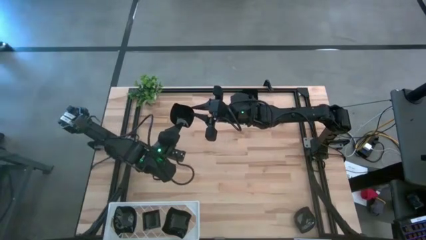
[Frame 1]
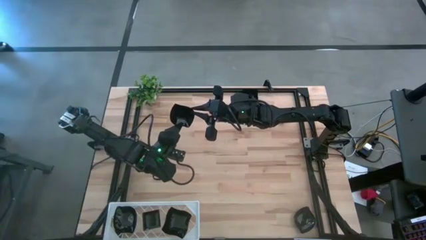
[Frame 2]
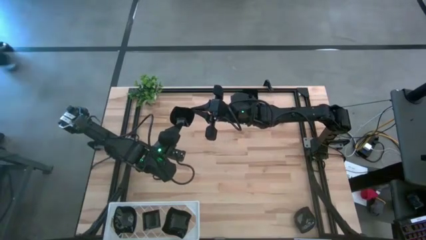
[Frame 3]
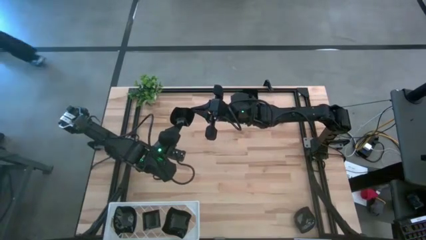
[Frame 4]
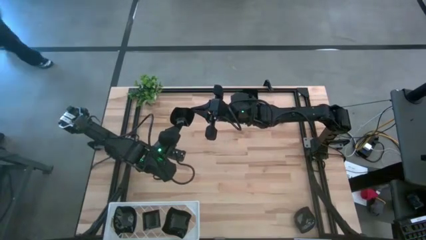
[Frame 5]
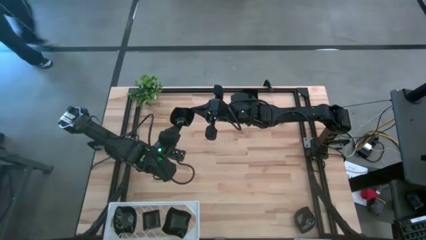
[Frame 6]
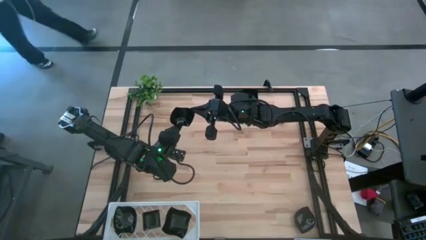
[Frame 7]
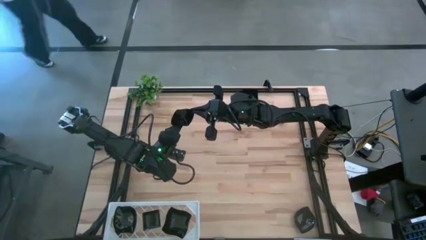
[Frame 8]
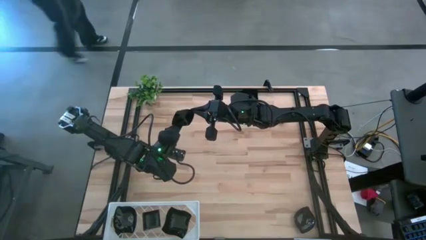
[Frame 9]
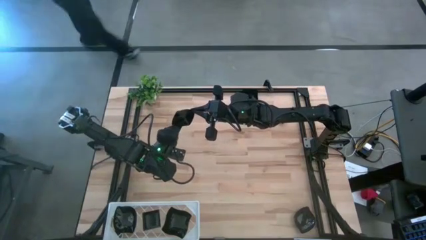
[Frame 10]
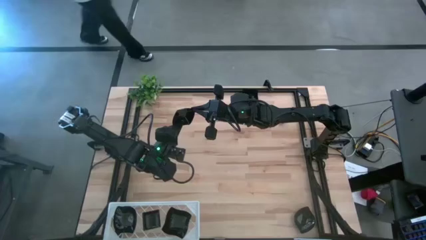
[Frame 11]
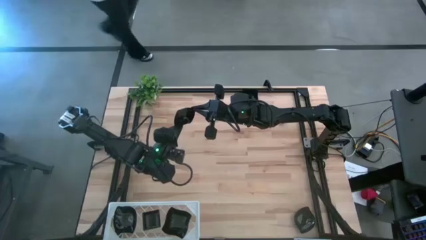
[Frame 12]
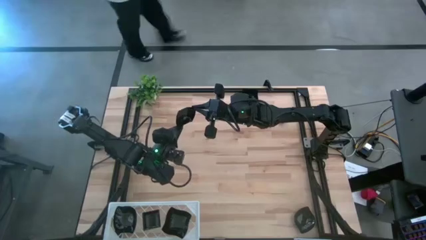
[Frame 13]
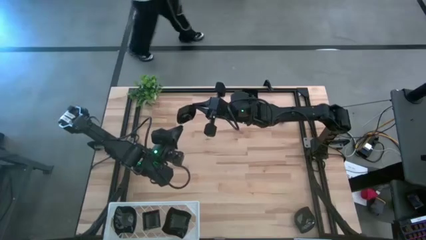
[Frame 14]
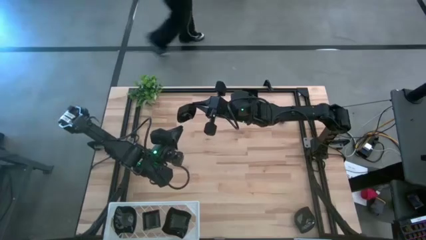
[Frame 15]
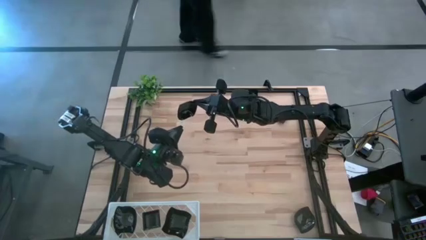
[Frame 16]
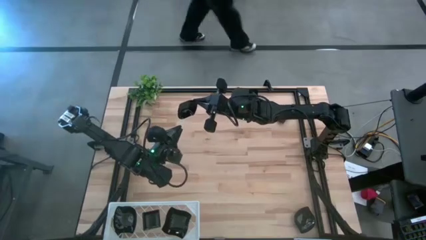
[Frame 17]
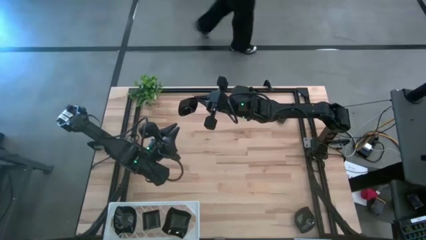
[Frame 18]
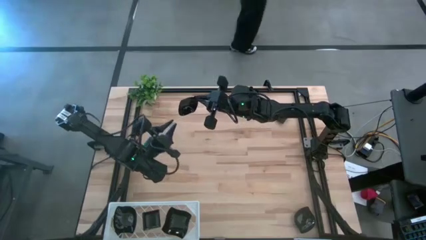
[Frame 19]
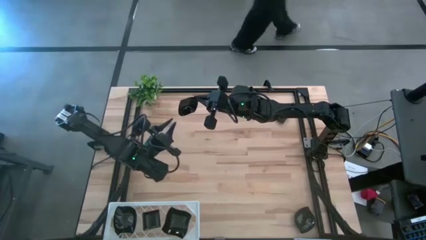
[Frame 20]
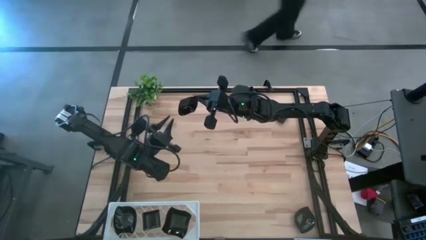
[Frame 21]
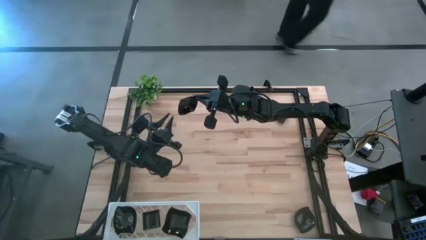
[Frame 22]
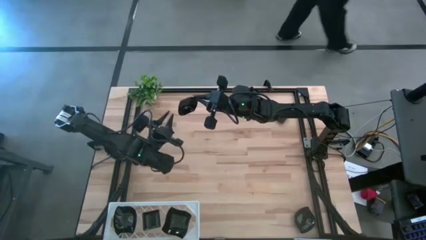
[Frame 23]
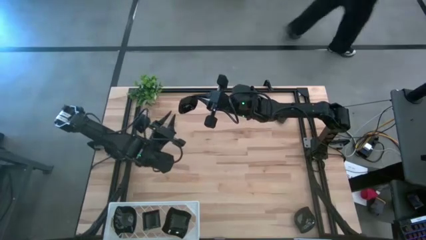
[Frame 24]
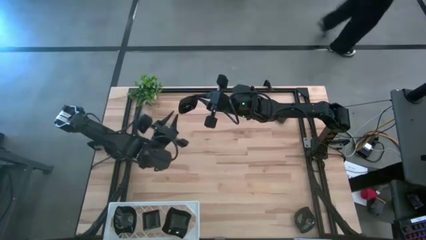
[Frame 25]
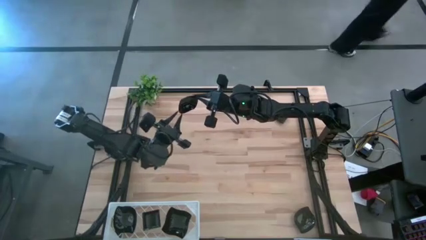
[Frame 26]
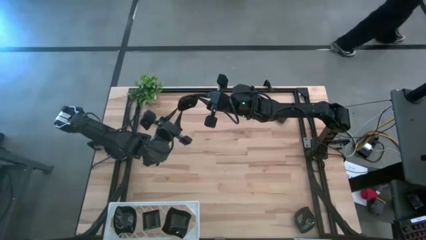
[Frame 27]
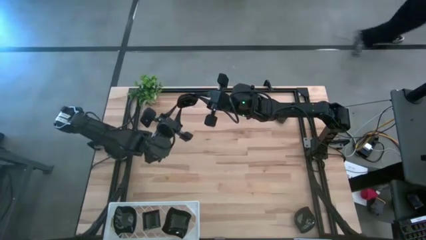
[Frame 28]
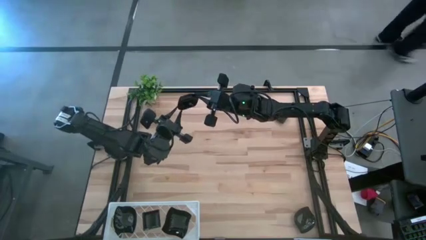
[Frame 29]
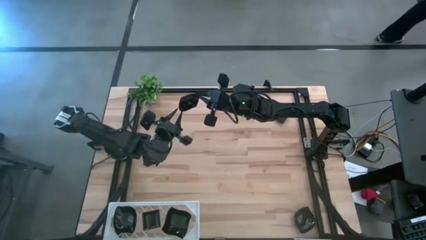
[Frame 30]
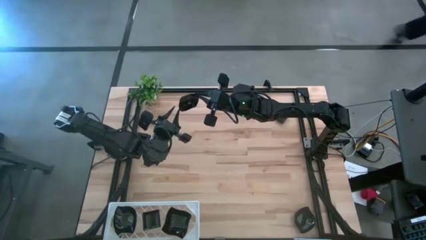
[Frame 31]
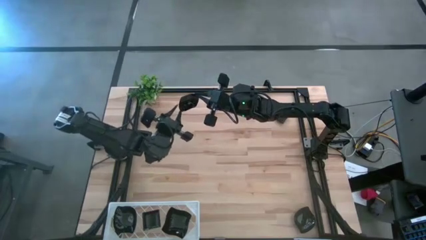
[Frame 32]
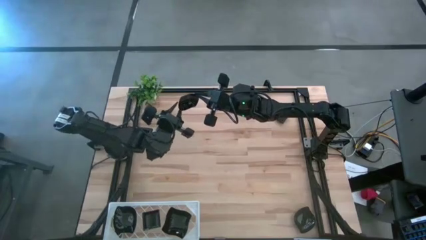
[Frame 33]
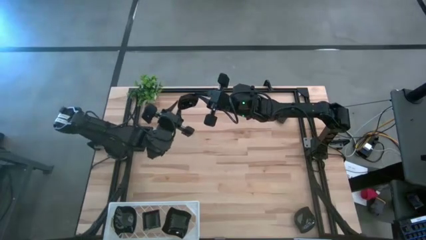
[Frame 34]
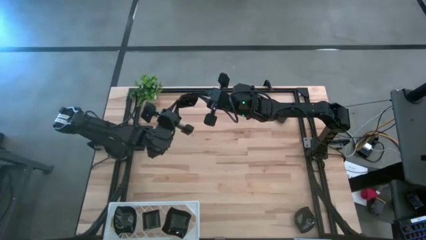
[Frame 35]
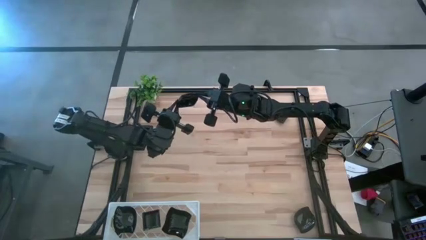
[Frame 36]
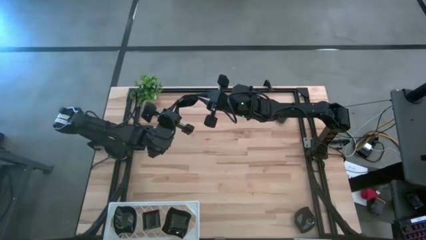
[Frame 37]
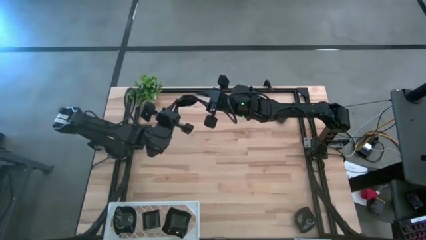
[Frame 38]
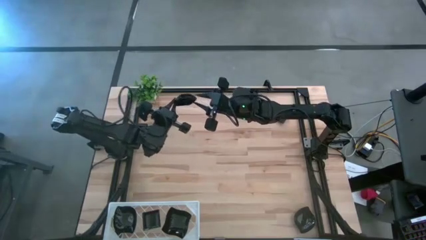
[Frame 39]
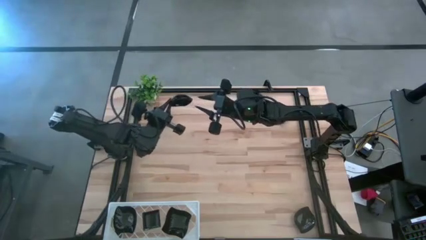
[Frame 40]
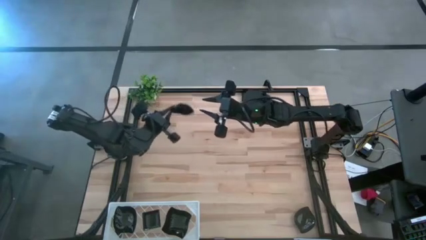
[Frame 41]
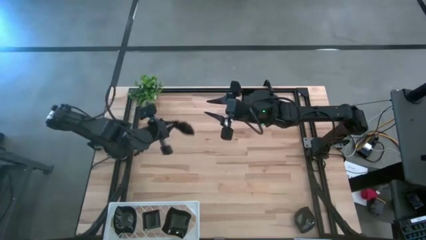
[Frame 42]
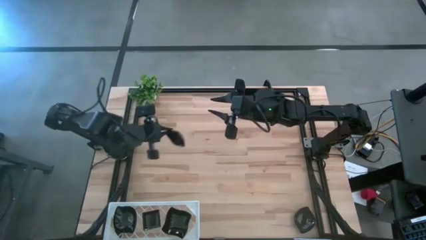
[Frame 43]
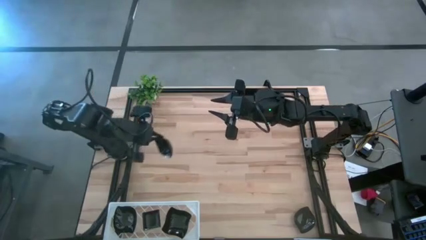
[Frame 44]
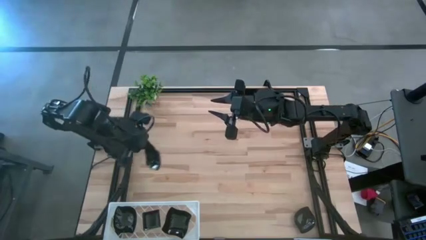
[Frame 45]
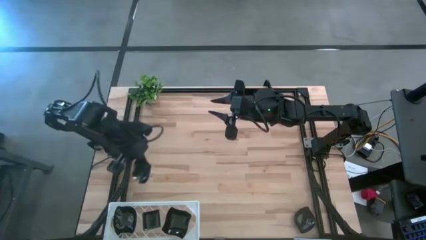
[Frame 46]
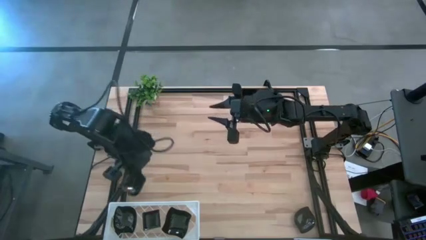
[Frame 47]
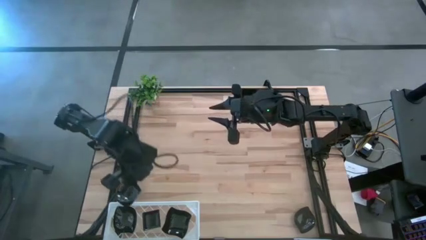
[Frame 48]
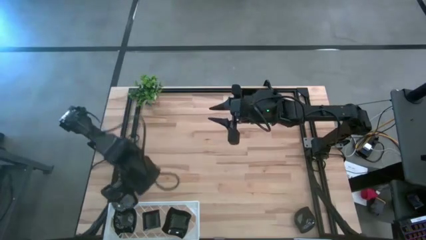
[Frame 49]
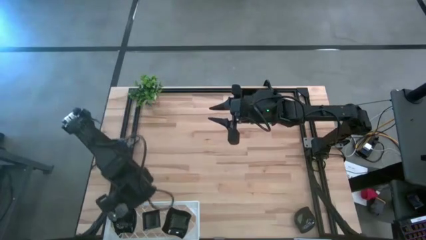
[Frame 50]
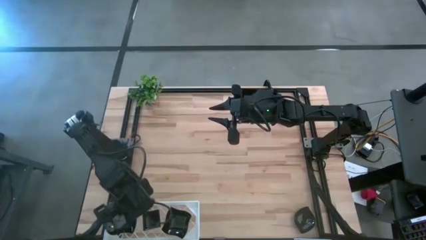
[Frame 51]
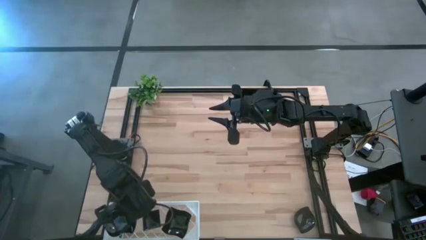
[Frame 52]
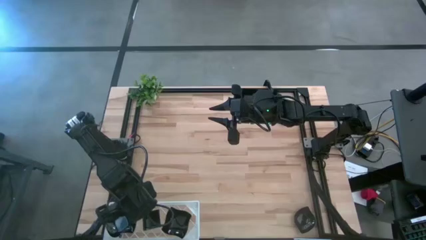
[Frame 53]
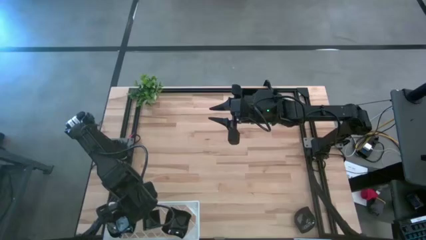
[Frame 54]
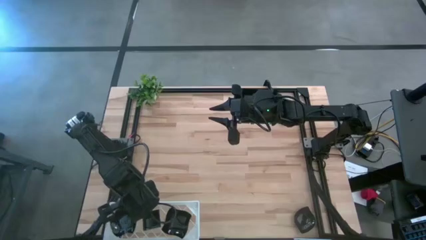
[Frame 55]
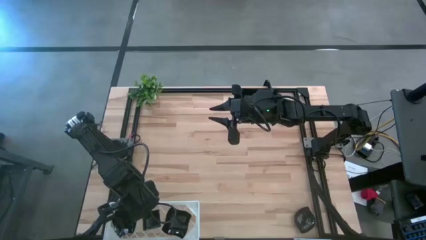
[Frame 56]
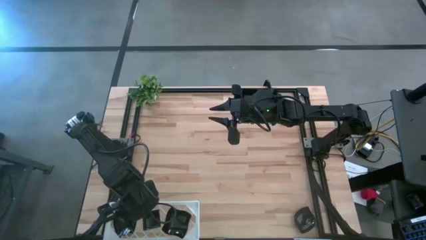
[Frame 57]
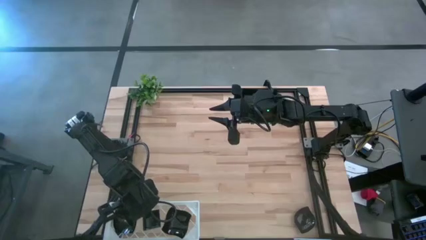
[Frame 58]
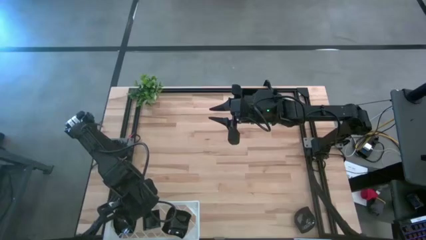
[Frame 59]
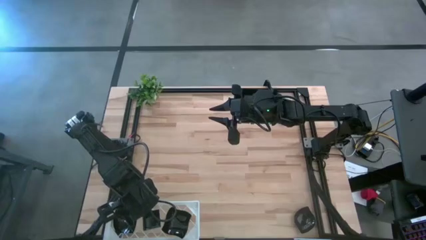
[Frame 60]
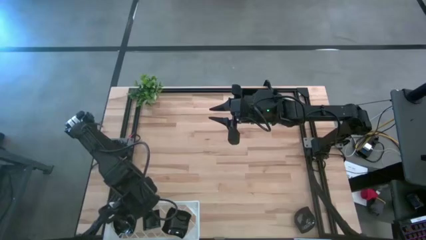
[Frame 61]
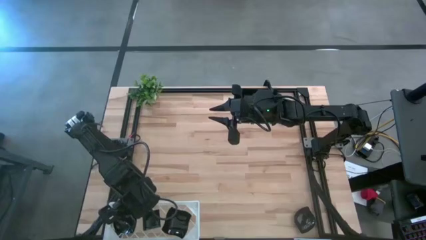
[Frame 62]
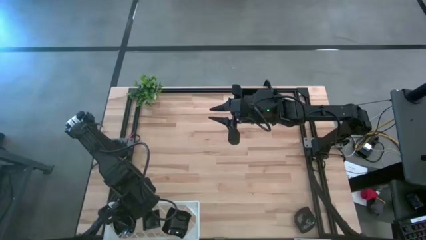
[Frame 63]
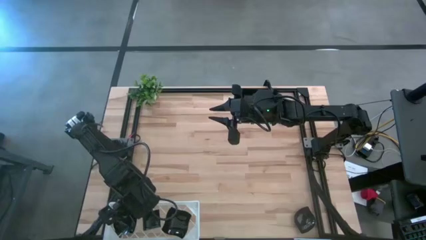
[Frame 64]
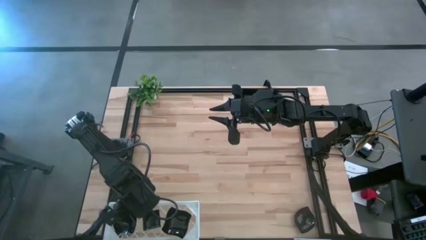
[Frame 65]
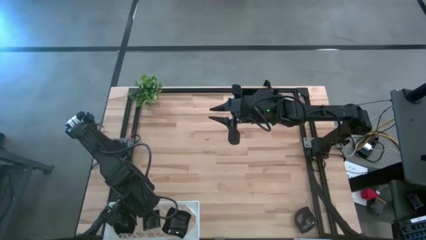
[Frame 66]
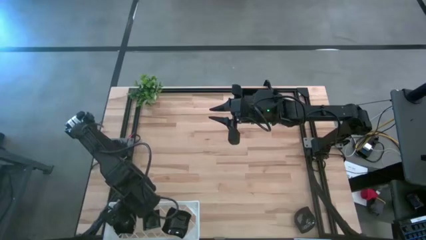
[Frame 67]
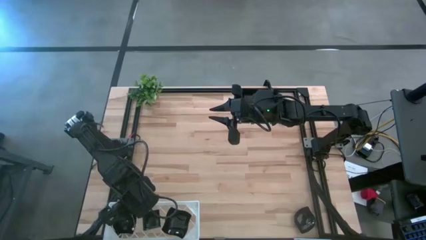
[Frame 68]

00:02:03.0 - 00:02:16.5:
Task: Pick & Place Mini shaped plates
Stack the black leaf shaped plate on top of the other black leaf shaped plates on the shelf
